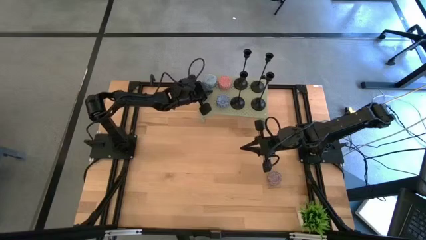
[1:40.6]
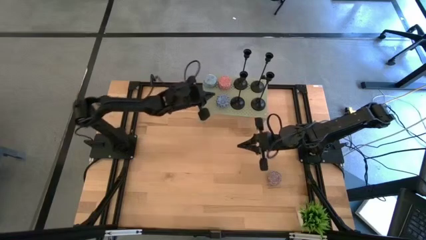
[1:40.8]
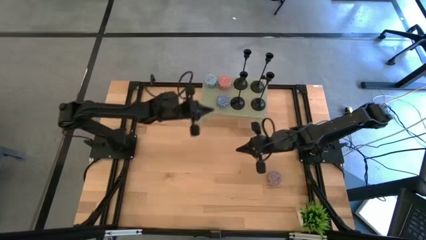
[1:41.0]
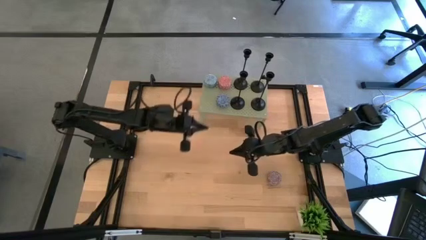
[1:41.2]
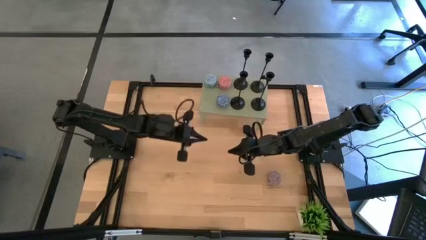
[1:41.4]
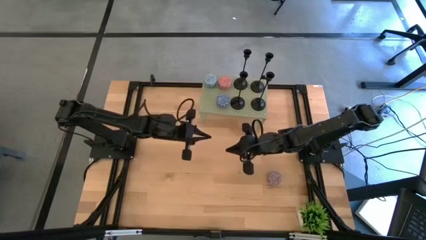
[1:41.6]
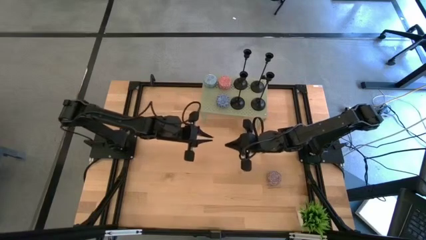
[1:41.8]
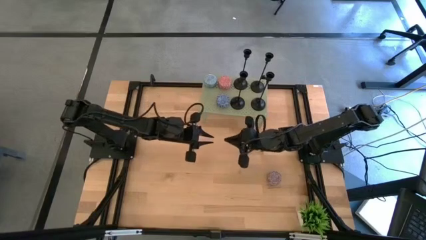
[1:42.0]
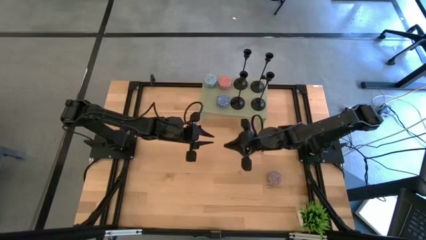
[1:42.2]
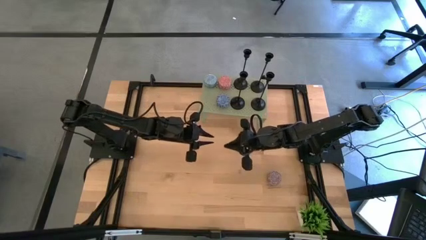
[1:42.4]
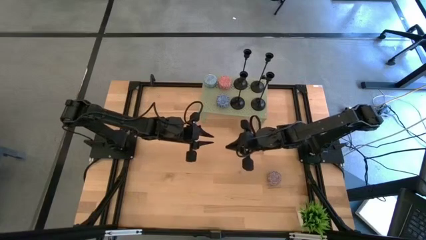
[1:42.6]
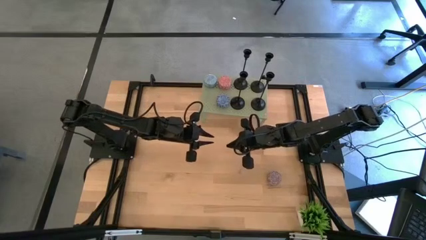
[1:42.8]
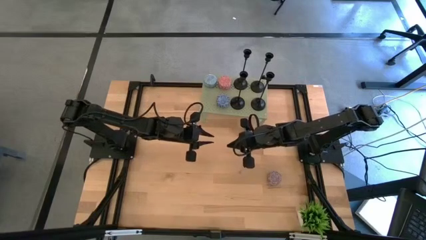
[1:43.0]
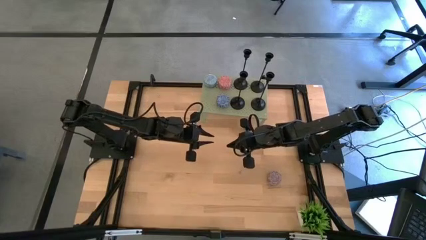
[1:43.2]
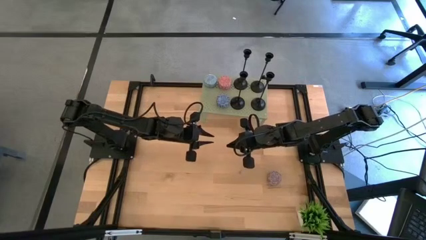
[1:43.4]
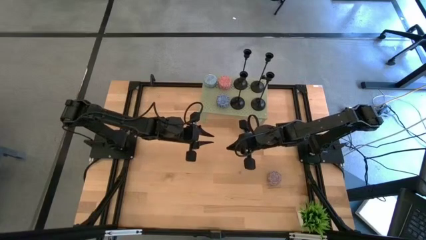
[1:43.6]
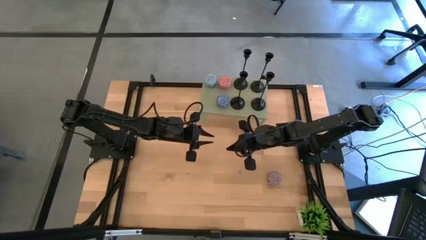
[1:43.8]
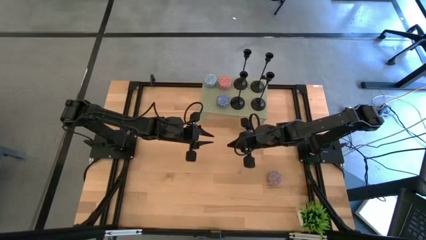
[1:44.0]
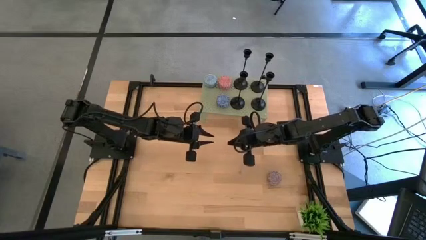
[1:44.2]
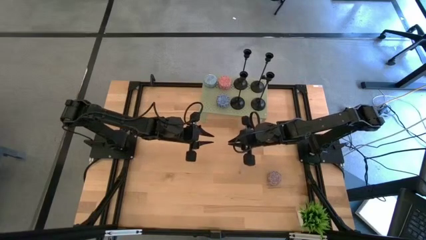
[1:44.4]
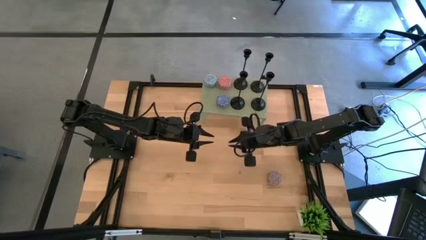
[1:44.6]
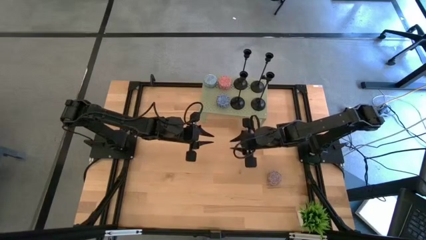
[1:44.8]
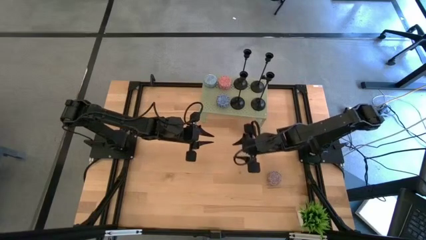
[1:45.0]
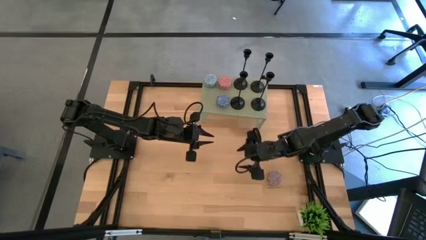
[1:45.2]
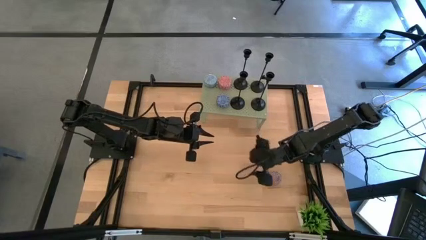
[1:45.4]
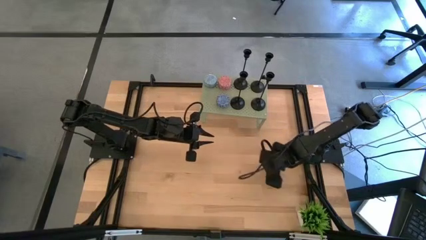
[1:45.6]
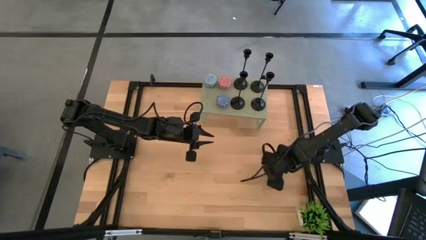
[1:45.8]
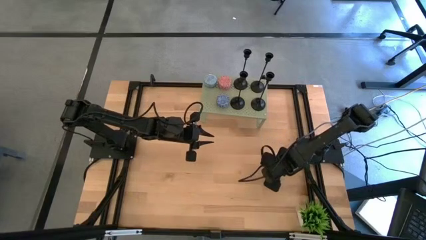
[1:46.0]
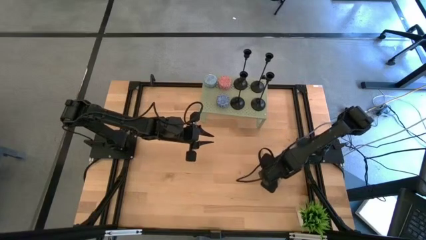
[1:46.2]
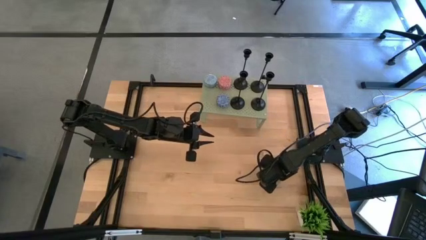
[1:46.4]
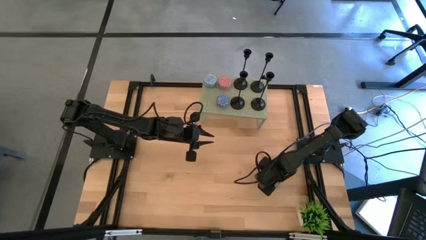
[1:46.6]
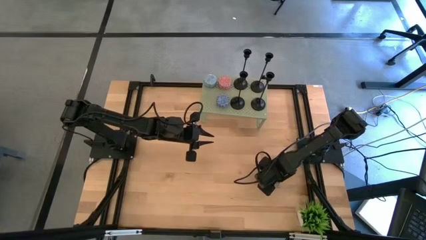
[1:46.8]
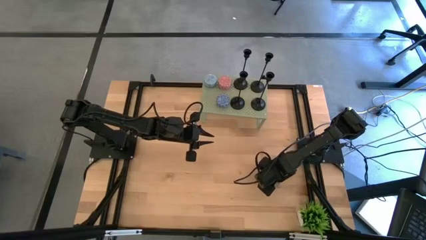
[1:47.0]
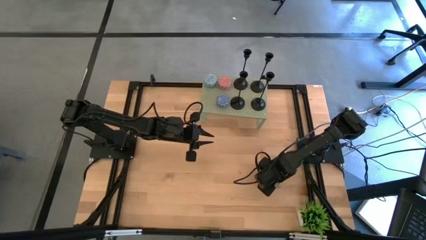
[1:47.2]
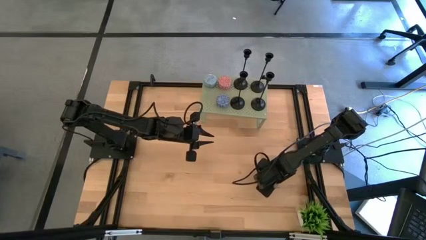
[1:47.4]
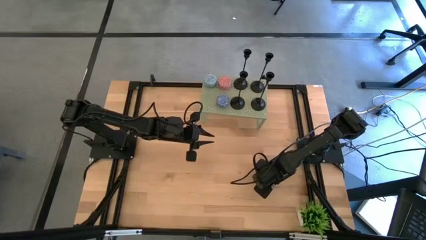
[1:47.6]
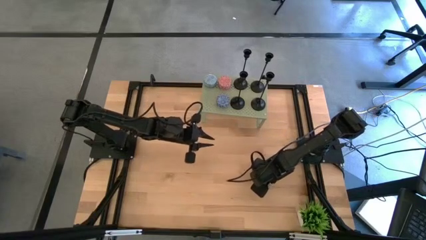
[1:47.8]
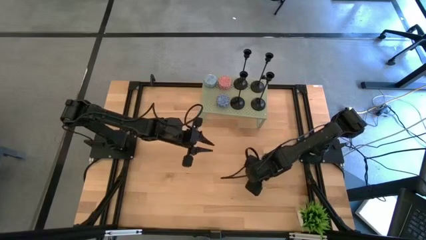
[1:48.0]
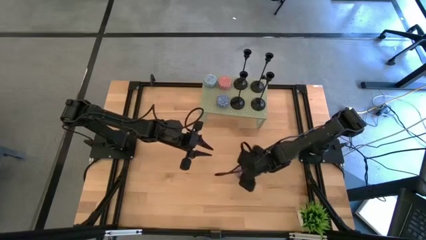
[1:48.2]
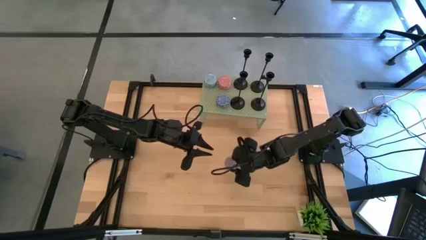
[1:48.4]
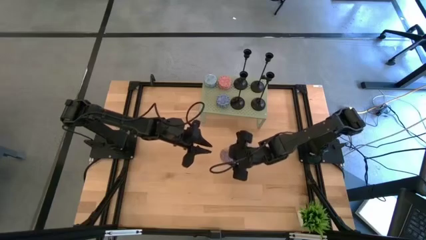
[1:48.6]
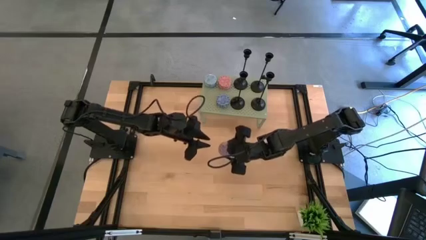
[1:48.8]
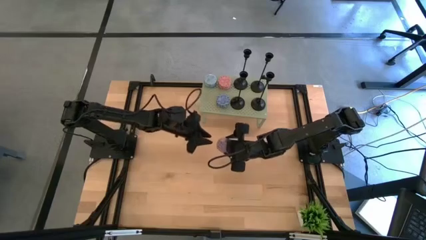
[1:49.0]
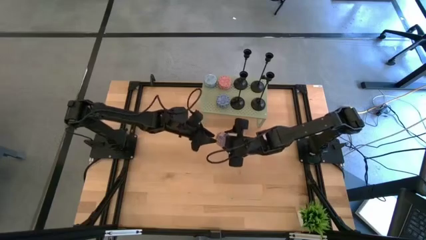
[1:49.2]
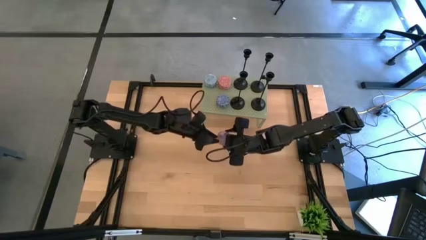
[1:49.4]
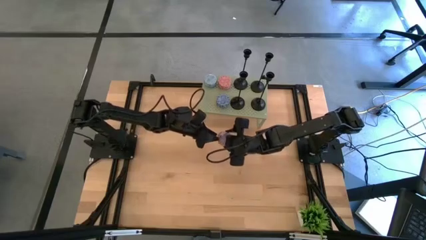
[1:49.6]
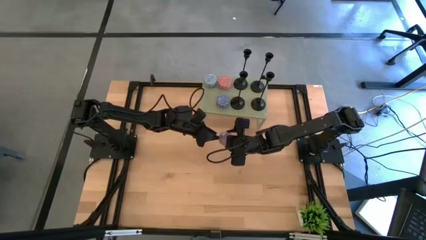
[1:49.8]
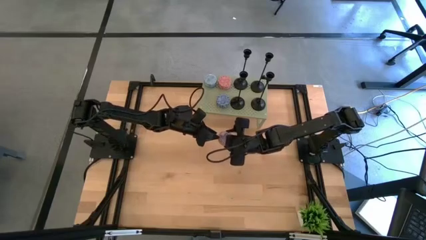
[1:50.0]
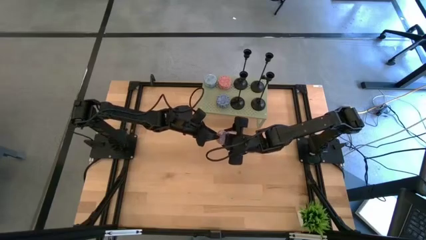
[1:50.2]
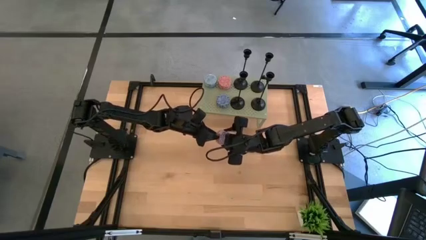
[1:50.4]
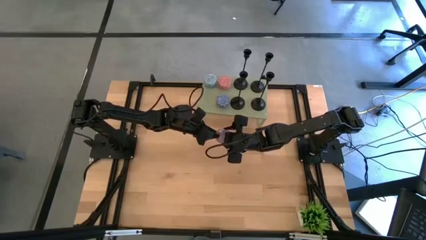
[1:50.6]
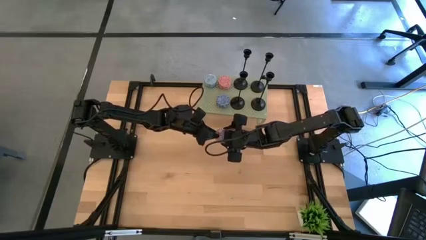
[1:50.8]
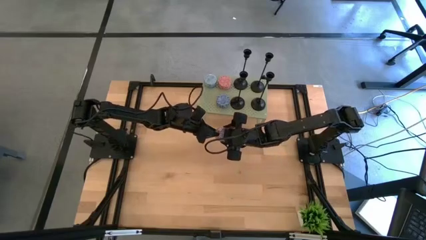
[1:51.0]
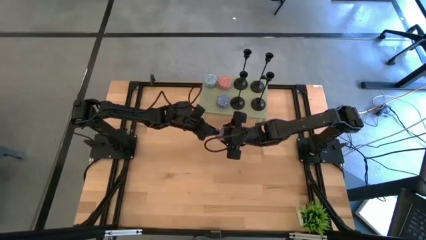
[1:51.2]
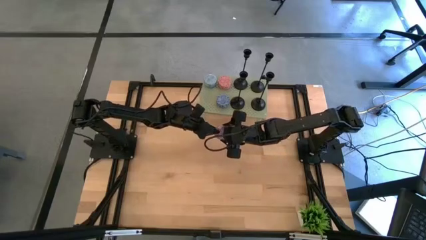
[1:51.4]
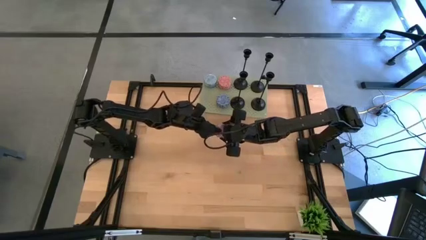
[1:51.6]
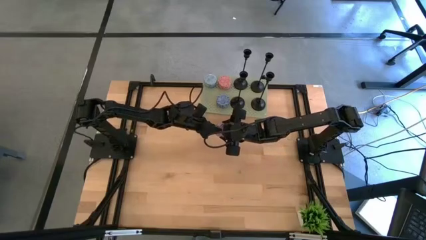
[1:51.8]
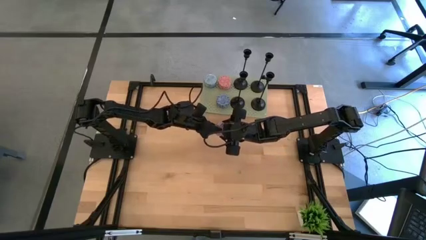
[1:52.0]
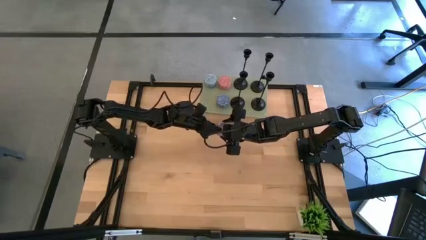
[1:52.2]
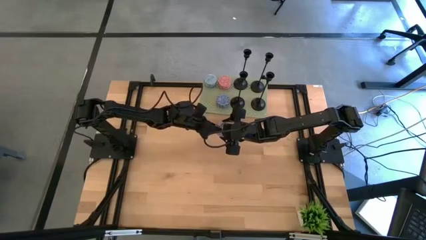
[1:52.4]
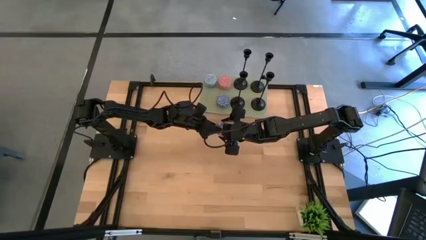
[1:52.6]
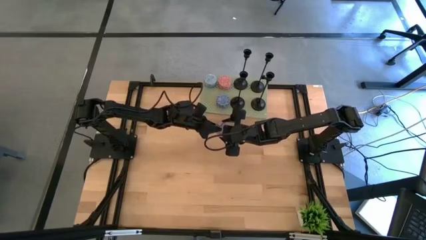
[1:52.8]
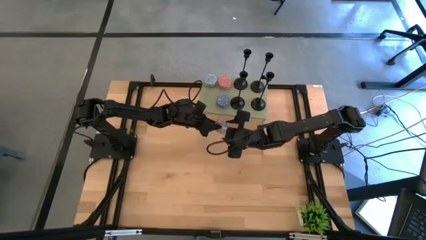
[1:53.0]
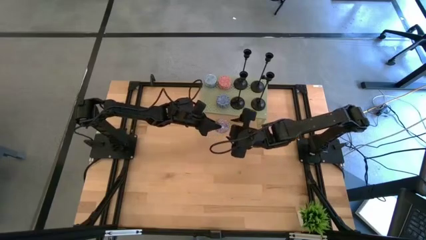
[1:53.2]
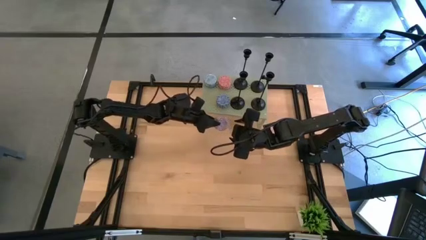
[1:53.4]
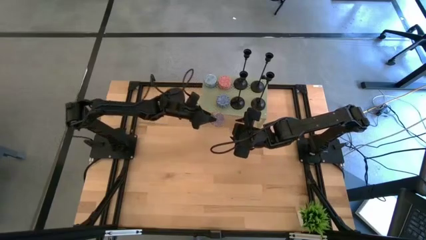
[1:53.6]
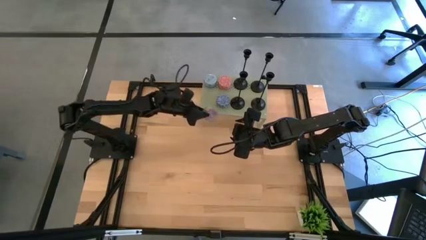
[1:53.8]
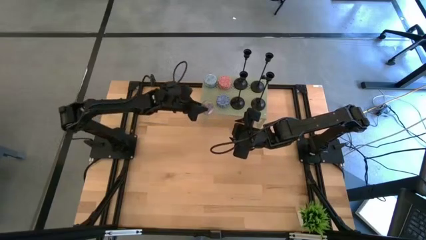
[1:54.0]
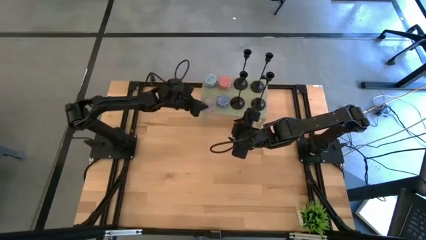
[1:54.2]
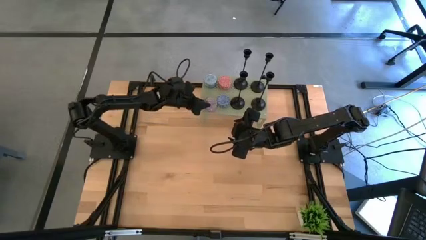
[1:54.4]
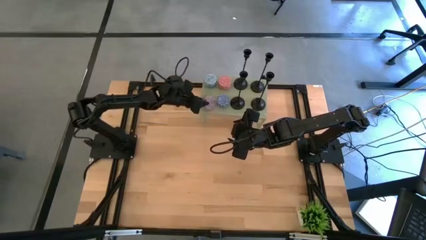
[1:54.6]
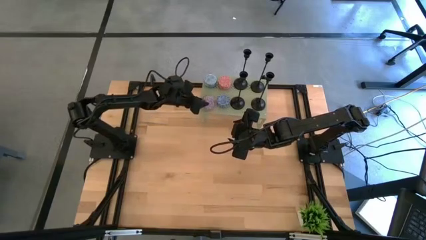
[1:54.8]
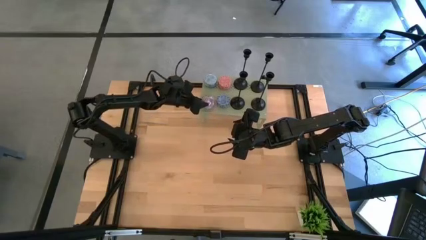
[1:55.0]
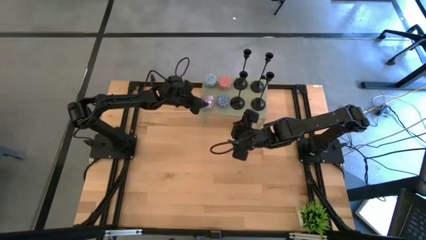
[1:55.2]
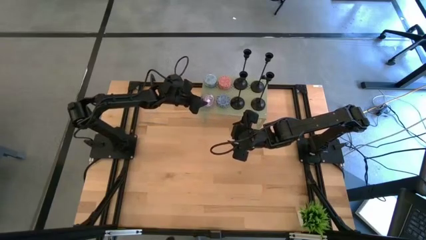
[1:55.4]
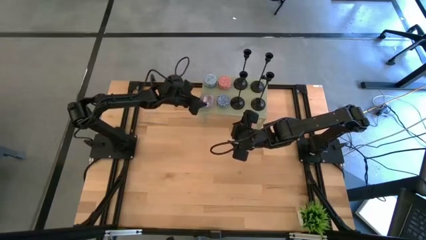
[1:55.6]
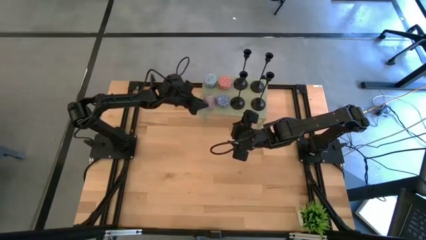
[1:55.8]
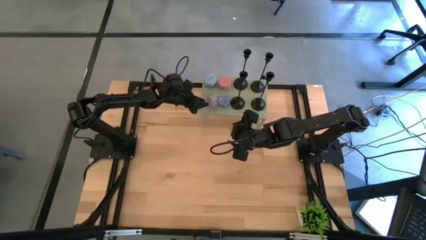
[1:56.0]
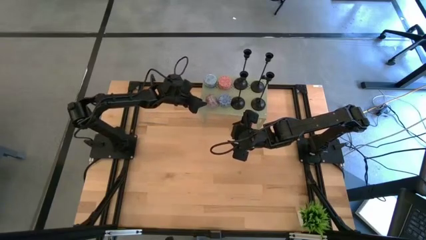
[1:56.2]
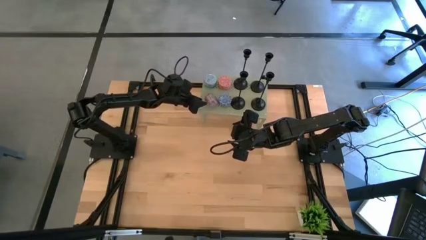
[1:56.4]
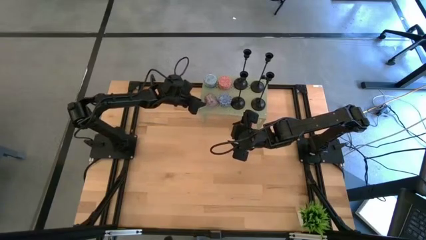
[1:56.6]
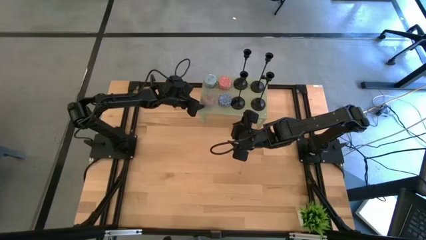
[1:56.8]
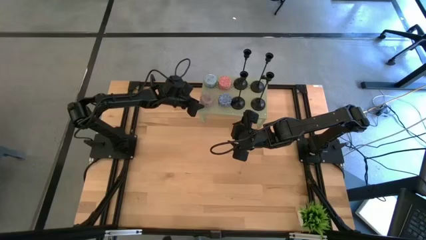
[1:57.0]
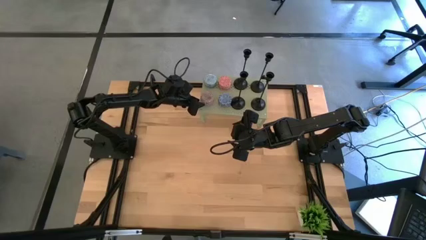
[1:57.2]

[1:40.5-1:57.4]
Task: Pick & Place candle stick holders
Put the dark blue scented candle on the shelf aligned with the other pink scented candle
